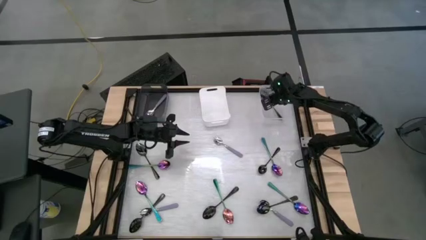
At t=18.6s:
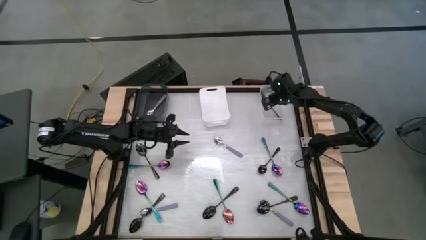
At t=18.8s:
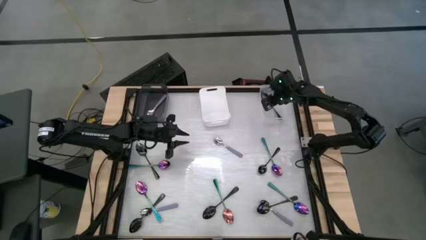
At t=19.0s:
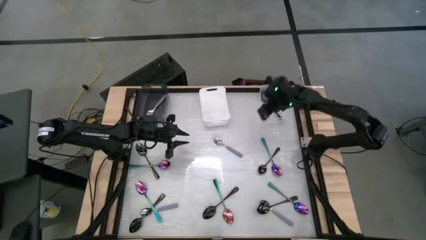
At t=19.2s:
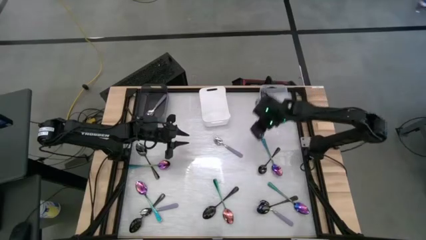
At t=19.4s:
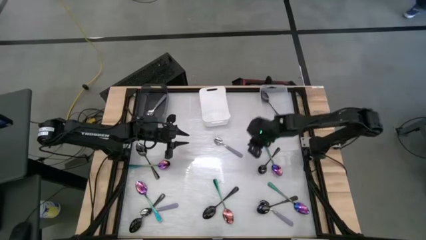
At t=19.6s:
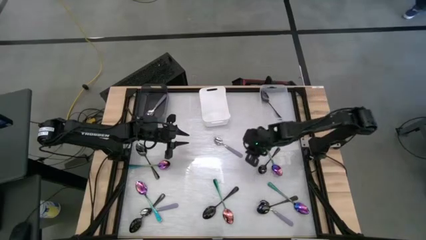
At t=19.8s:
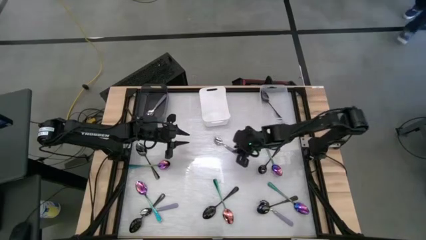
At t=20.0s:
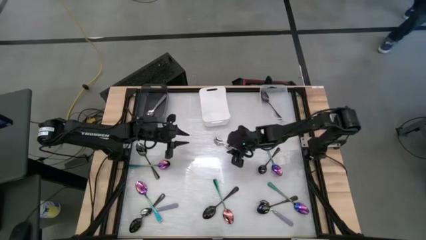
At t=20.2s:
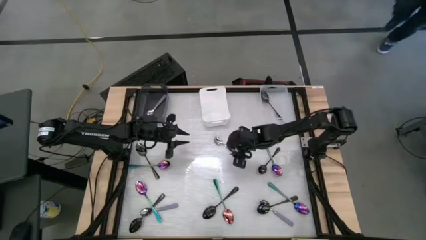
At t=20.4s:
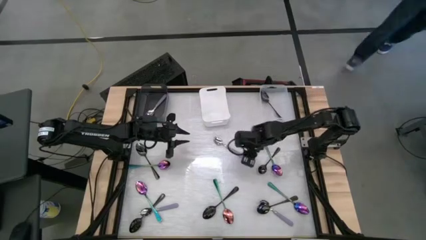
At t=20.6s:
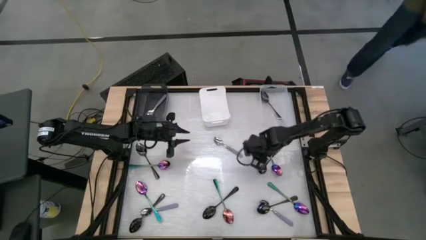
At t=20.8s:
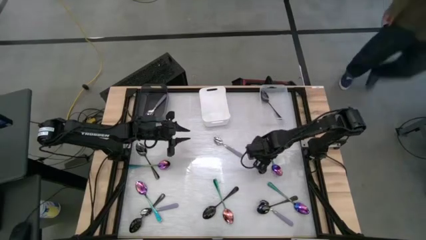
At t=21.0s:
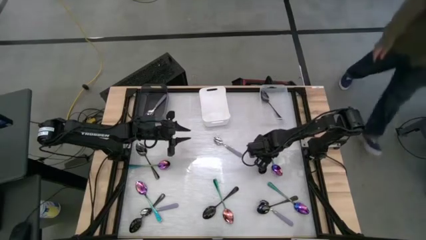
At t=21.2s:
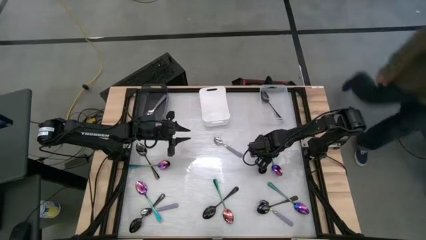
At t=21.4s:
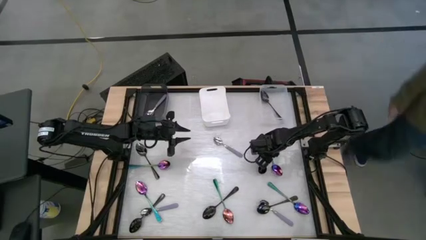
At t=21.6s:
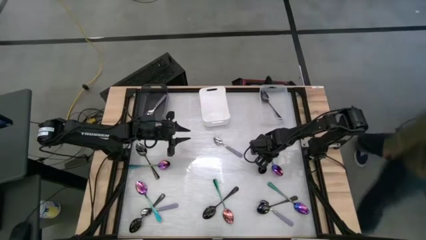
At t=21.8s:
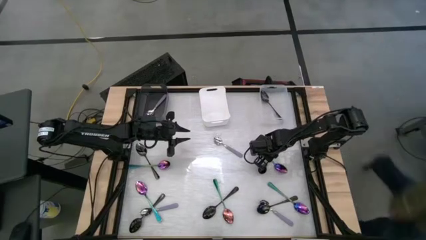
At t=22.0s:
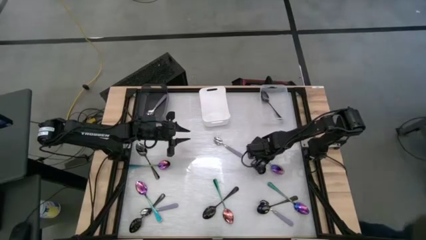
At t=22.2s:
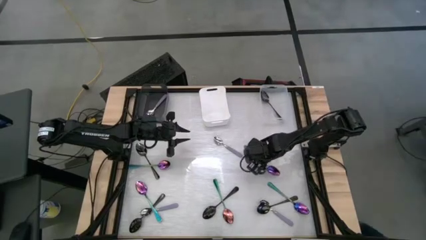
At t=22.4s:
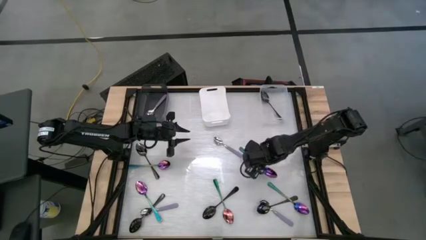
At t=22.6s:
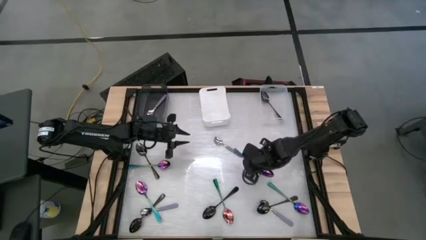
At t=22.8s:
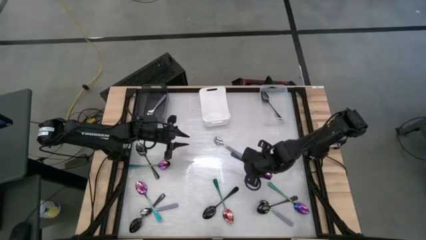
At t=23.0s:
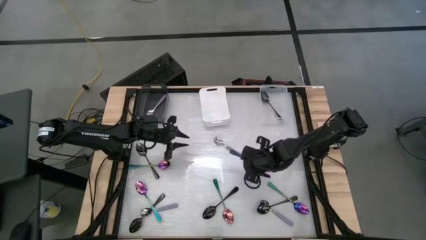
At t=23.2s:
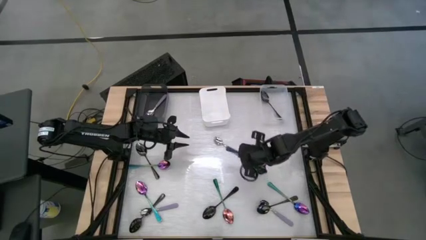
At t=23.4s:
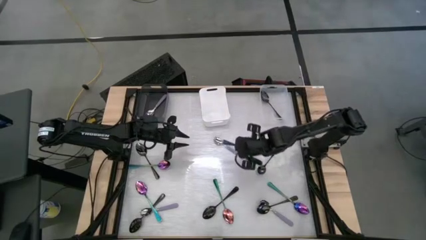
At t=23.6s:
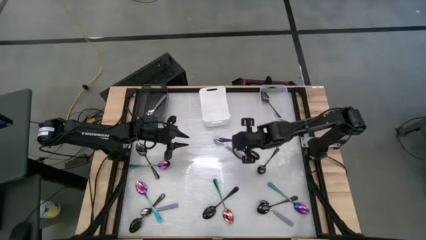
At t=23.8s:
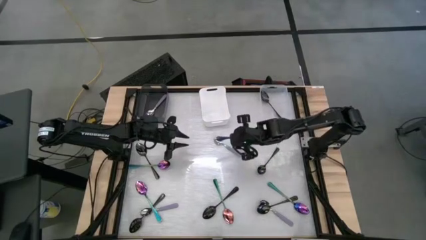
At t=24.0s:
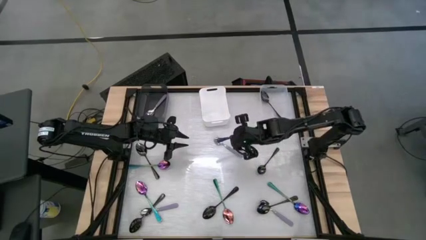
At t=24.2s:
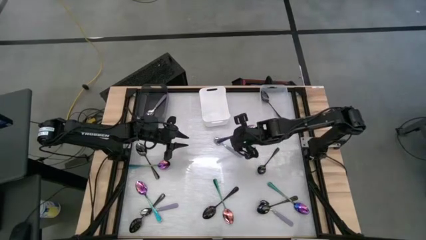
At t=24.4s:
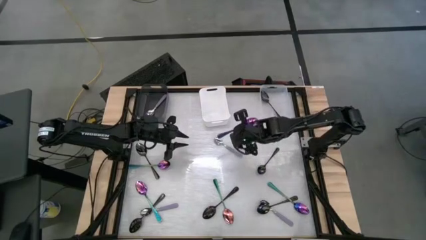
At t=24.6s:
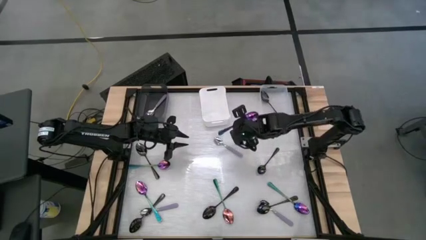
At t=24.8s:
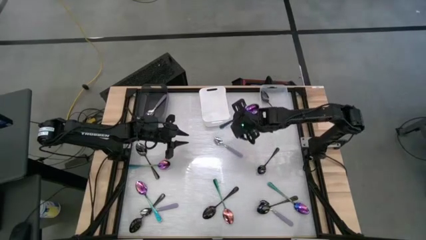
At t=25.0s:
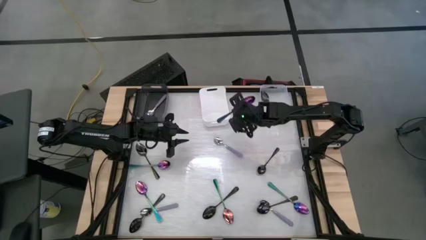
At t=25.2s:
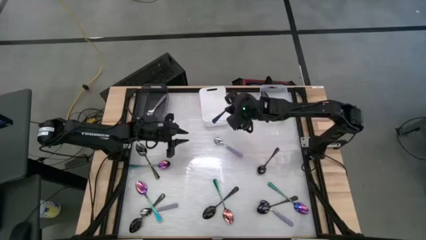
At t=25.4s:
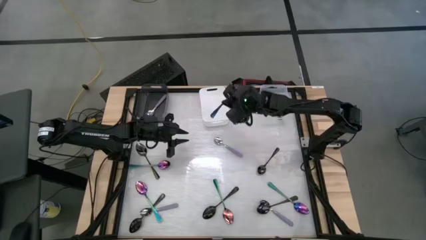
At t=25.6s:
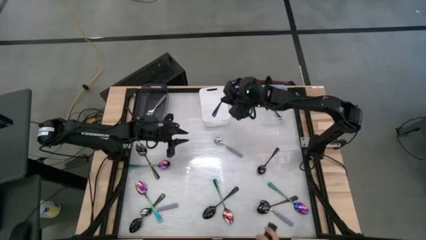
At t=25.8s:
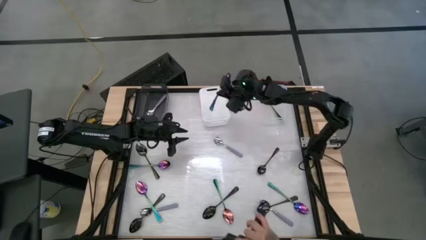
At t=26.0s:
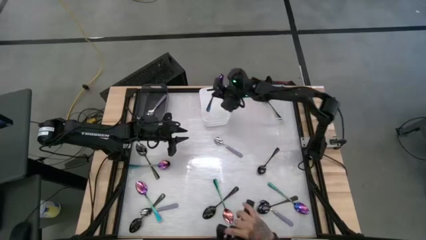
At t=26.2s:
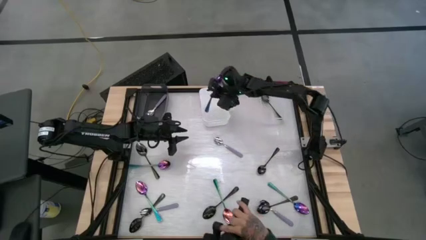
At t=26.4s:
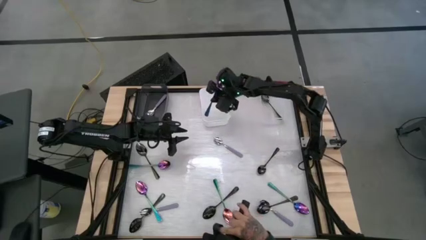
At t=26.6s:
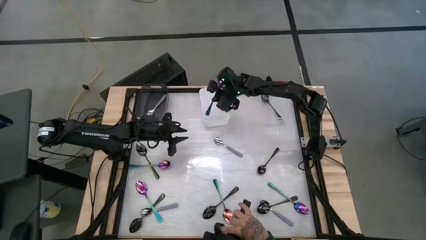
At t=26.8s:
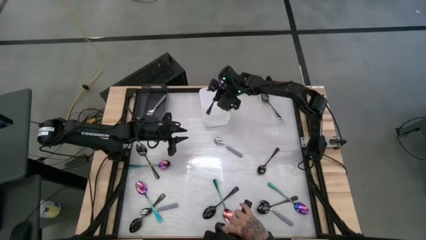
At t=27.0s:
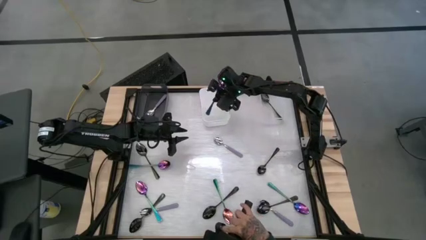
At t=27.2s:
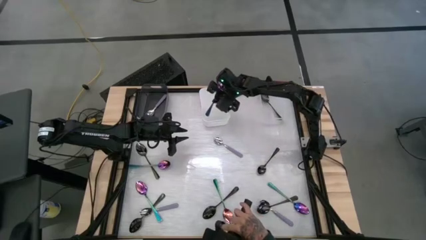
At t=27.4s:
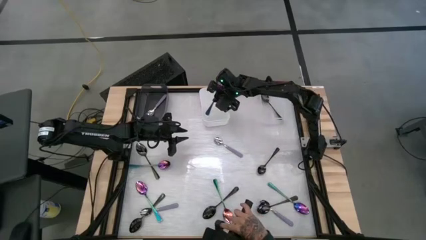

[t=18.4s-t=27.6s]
Task: Sort silverware by color (type)
Put the blue spoon into the transparent bin

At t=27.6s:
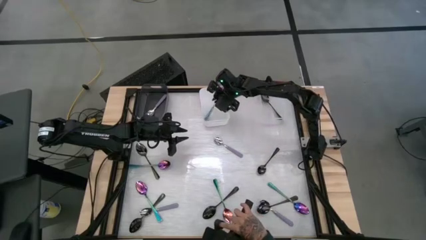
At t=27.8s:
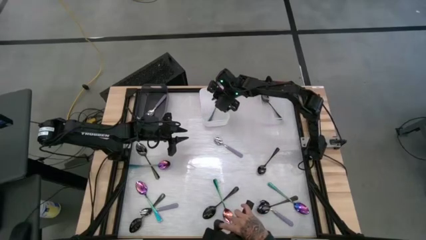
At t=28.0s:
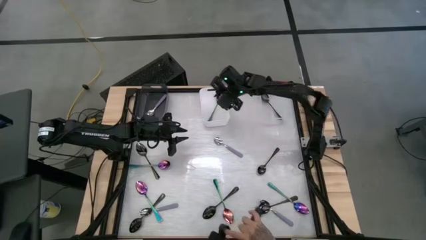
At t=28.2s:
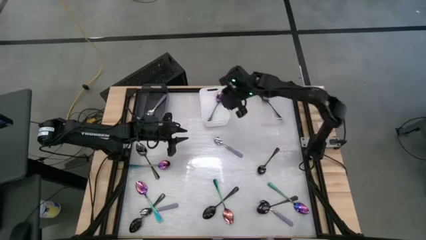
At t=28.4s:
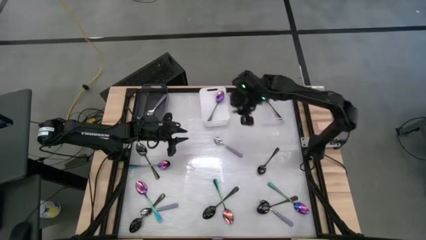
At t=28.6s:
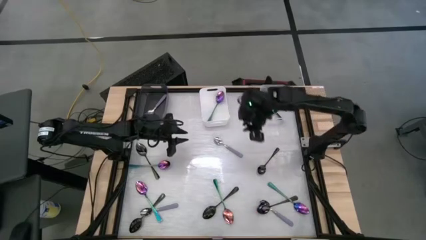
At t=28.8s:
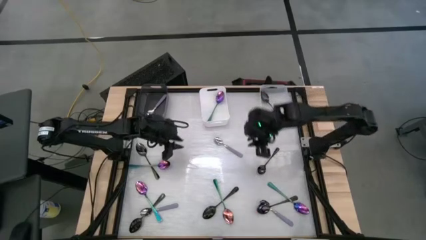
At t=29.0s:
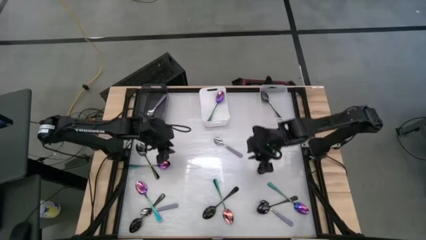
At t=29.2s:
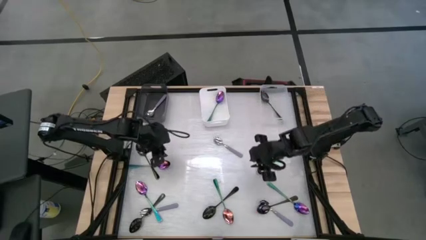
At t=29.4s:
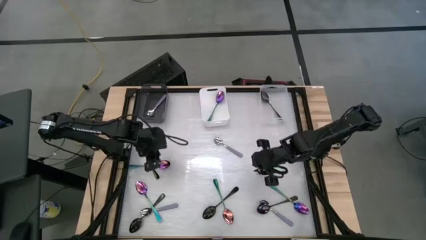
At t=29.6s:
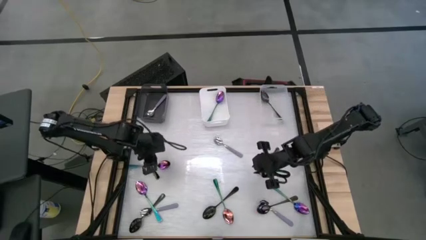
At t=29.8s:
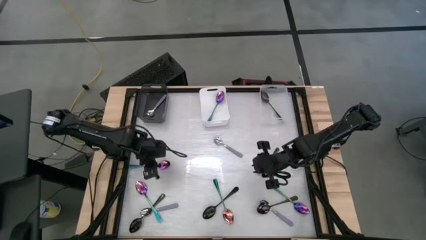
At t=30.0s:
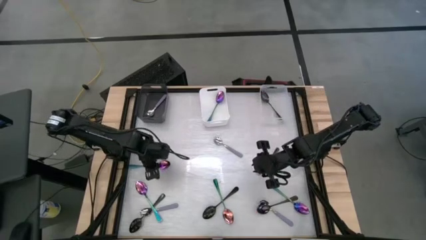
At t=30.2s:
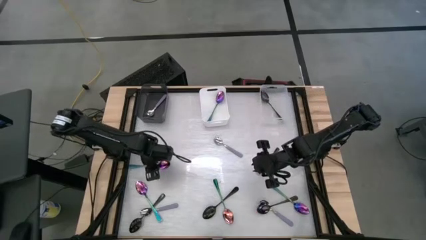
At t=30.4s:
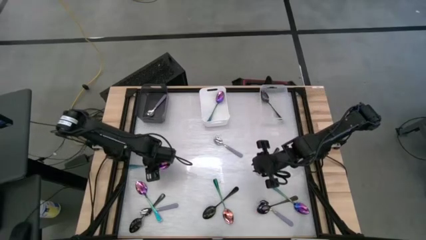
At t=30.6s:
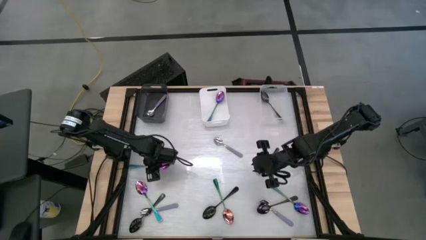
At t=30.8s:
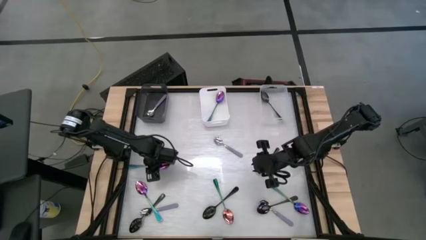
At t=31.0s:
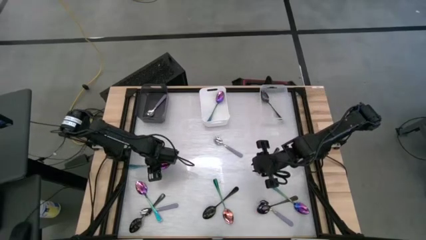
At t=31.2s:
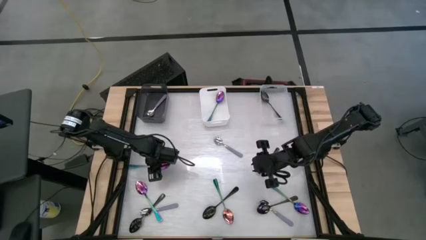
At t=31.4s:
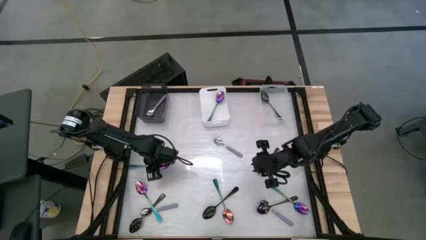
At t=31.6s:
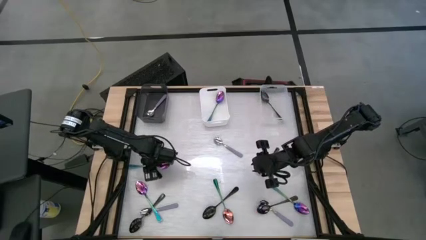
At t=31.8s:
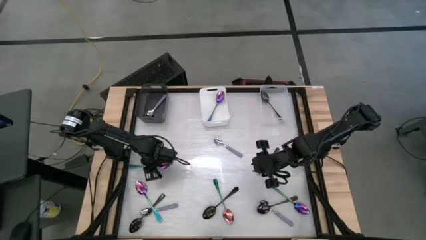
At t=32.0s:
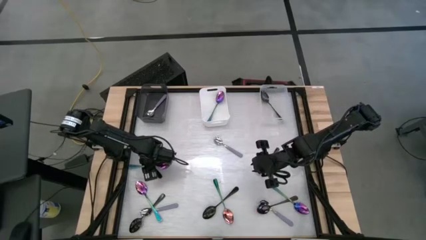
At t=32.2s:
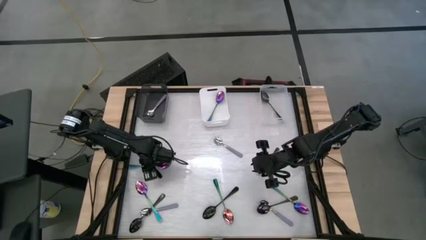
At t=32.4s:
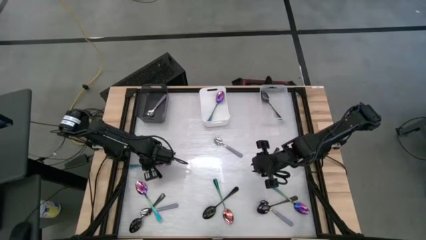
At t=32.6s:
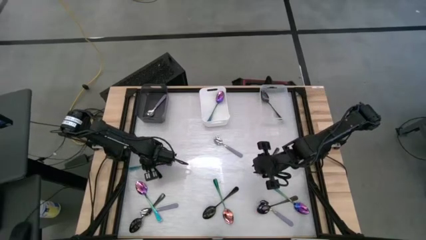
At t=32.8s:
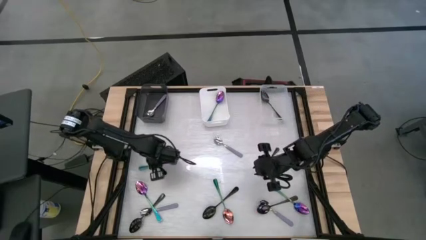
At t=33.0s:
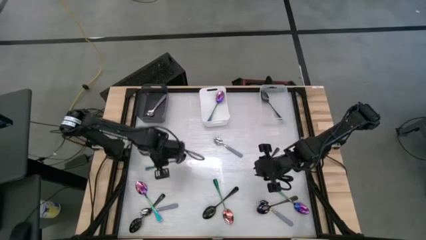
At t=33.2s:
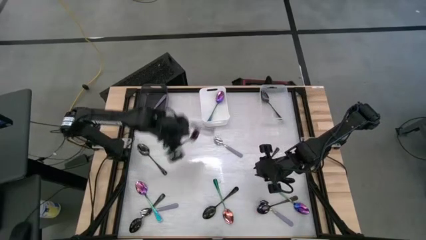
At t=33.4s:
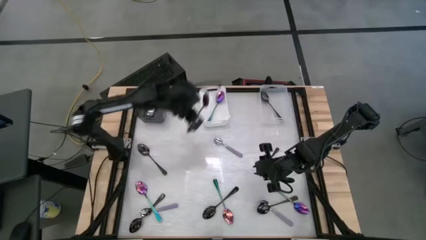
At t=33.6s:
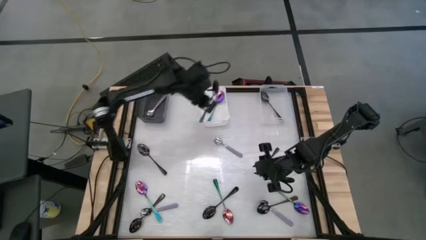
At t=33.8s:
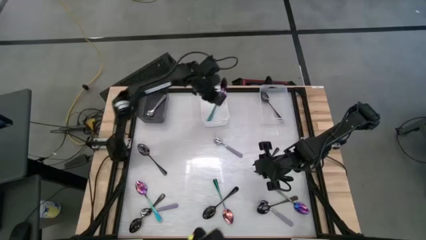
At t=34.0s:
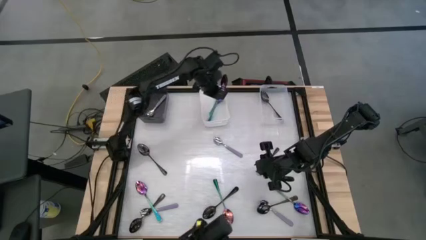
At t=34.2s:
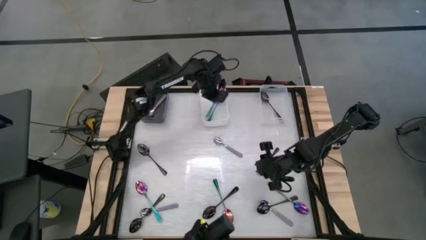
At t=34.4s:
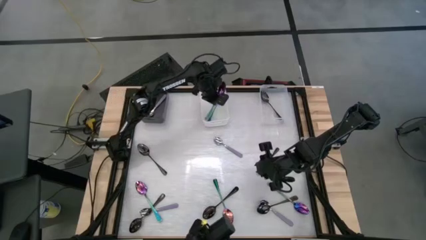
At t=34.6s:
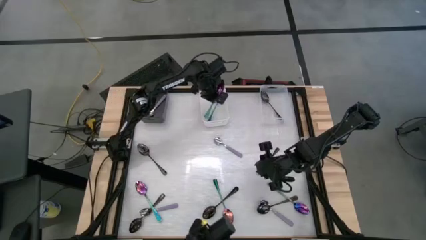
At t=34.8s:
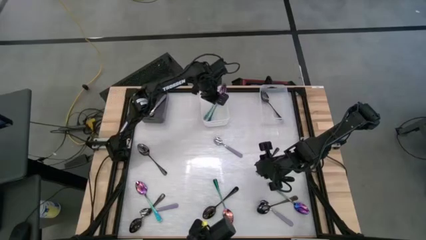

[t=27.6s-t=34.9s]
Put the blue spoon into the white bin
